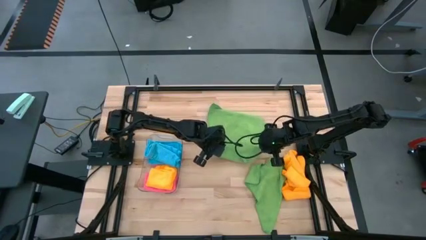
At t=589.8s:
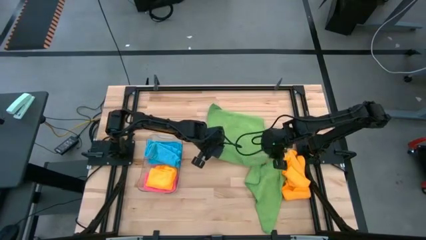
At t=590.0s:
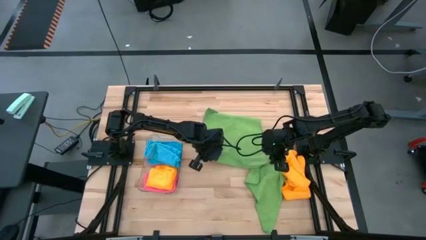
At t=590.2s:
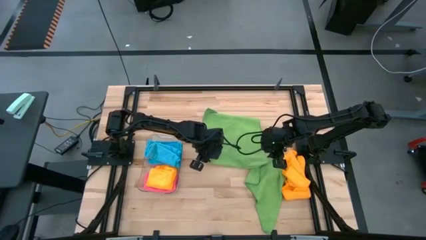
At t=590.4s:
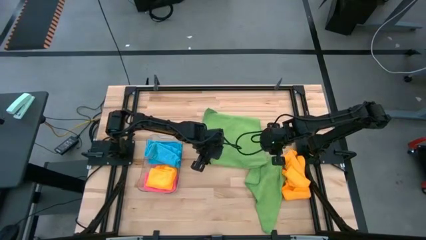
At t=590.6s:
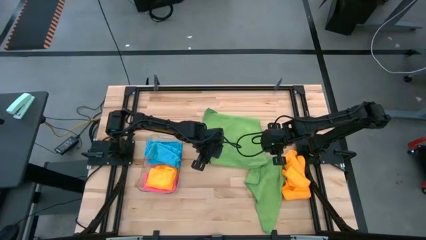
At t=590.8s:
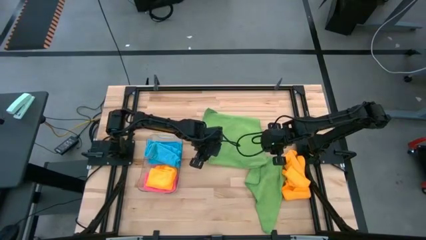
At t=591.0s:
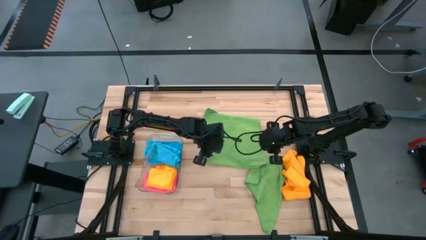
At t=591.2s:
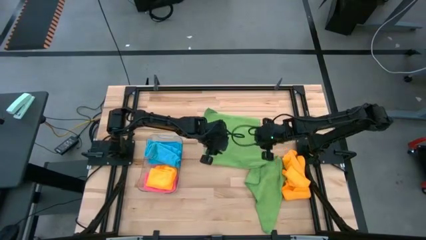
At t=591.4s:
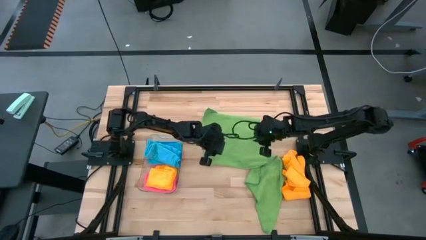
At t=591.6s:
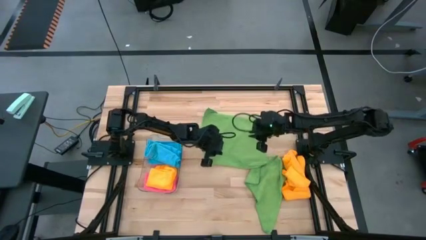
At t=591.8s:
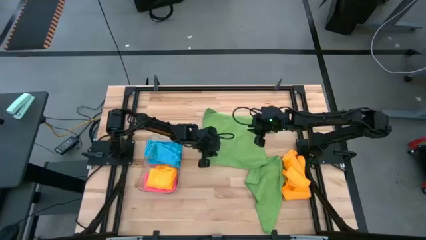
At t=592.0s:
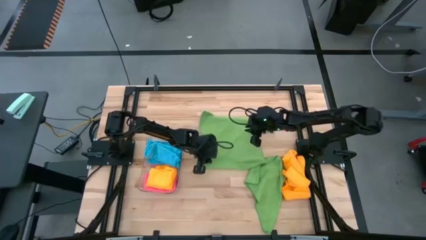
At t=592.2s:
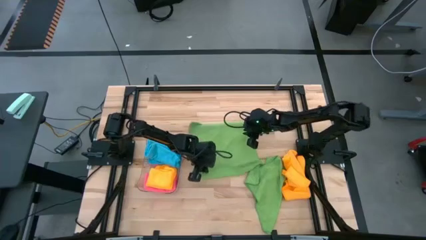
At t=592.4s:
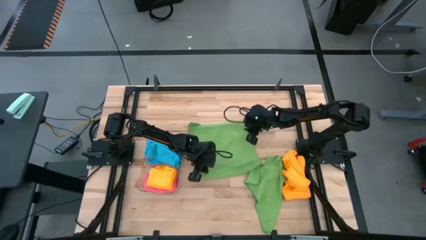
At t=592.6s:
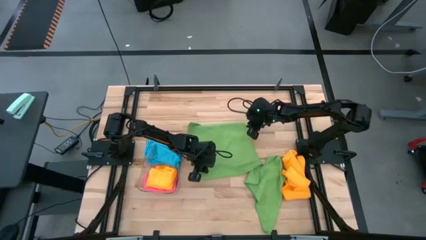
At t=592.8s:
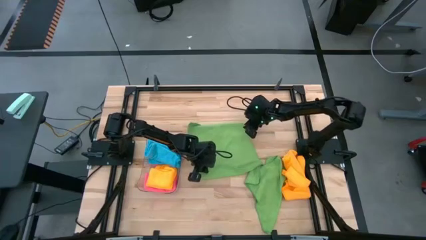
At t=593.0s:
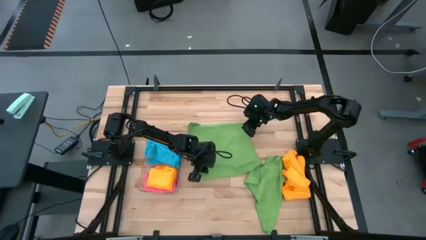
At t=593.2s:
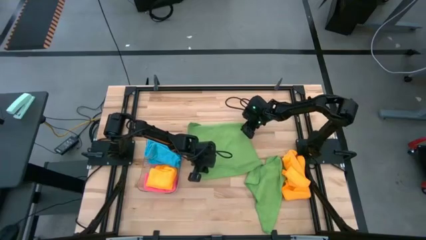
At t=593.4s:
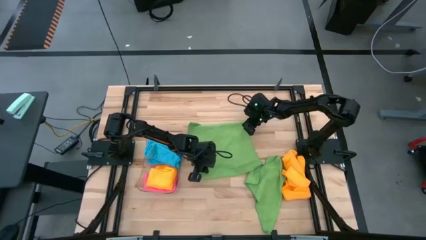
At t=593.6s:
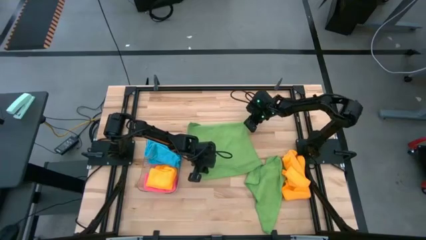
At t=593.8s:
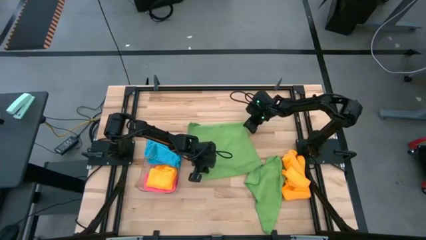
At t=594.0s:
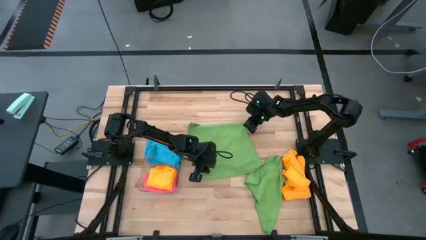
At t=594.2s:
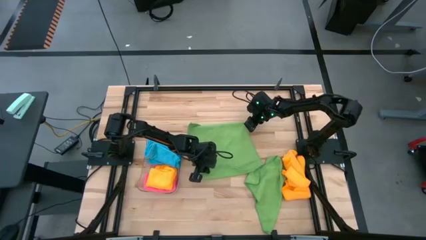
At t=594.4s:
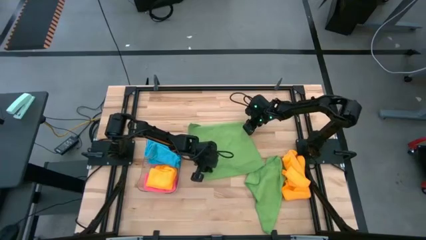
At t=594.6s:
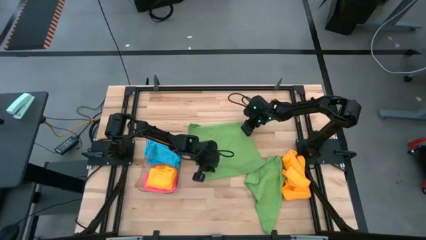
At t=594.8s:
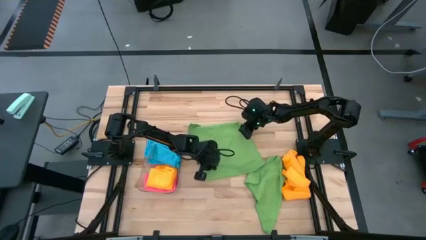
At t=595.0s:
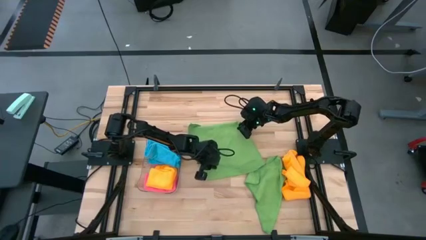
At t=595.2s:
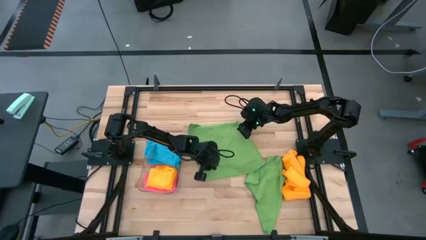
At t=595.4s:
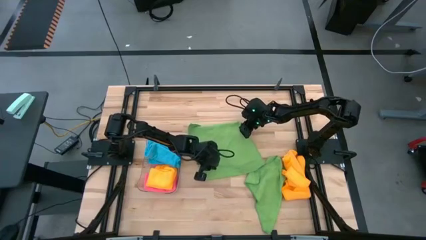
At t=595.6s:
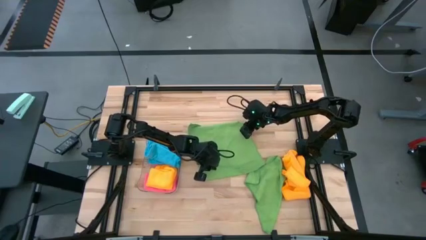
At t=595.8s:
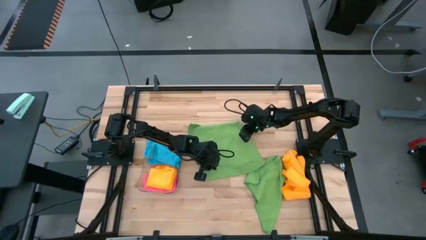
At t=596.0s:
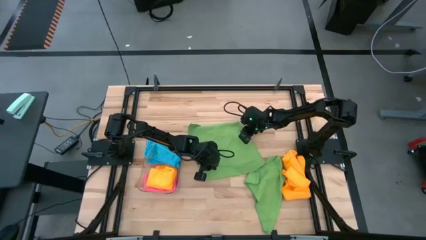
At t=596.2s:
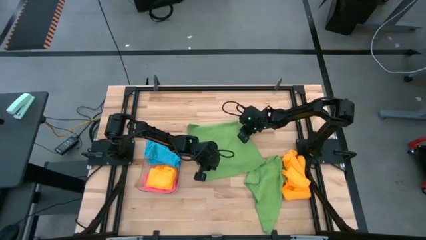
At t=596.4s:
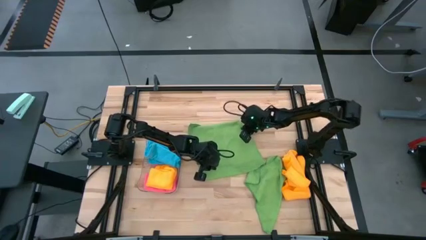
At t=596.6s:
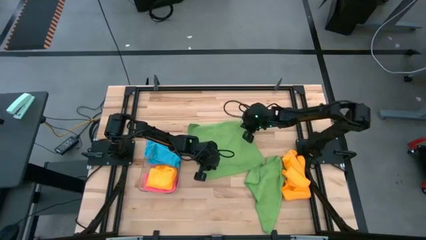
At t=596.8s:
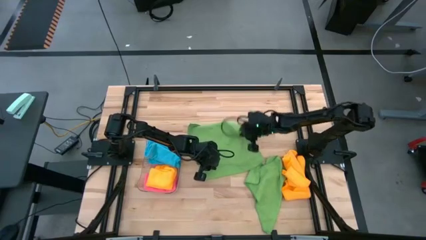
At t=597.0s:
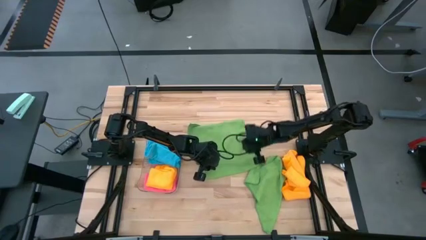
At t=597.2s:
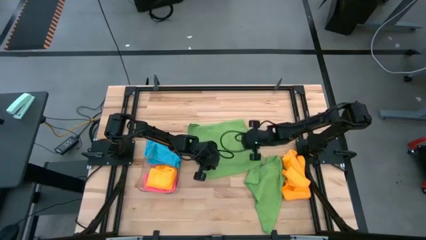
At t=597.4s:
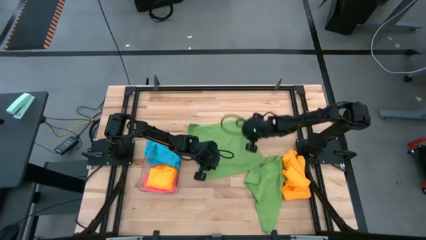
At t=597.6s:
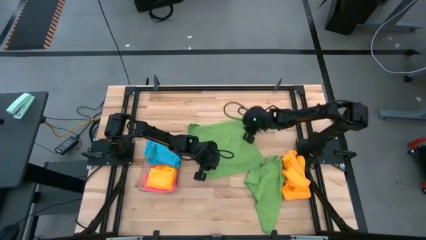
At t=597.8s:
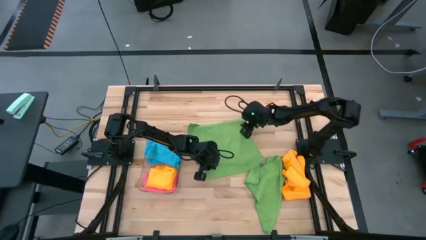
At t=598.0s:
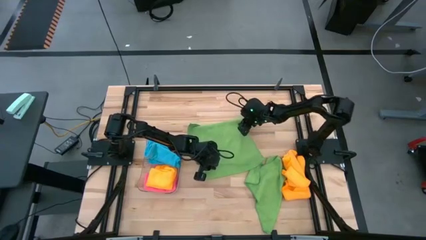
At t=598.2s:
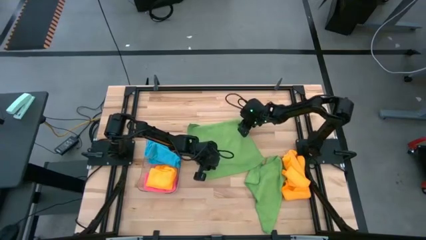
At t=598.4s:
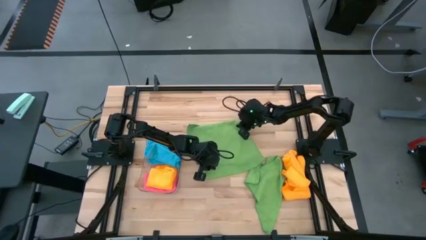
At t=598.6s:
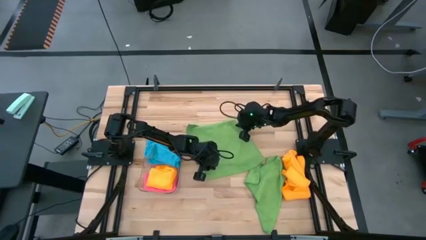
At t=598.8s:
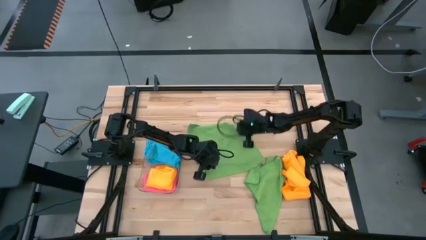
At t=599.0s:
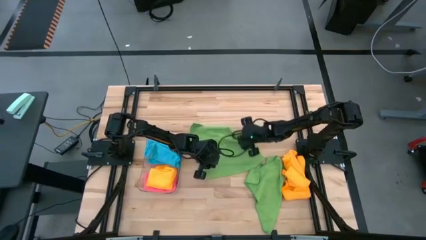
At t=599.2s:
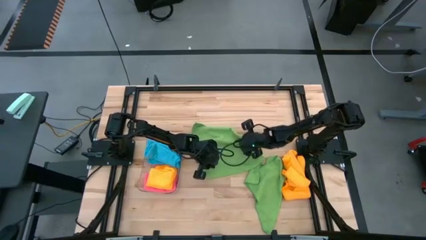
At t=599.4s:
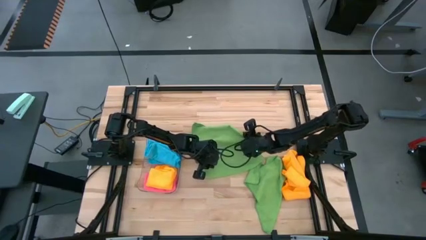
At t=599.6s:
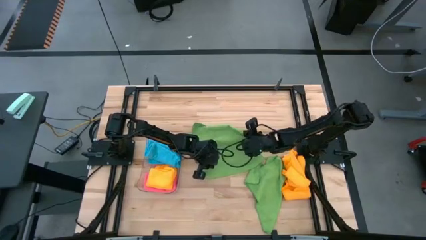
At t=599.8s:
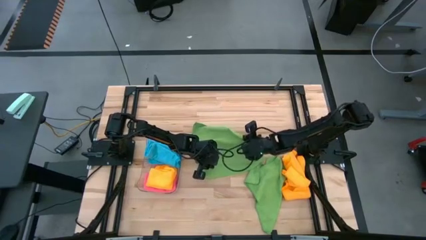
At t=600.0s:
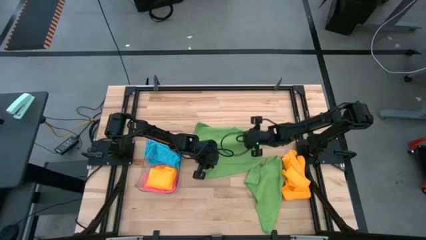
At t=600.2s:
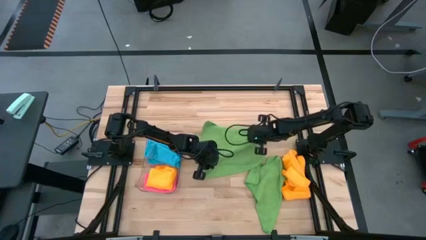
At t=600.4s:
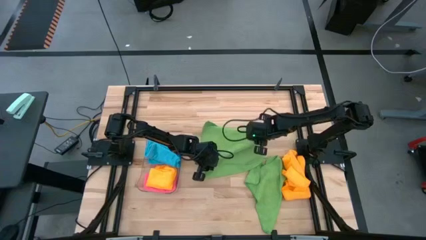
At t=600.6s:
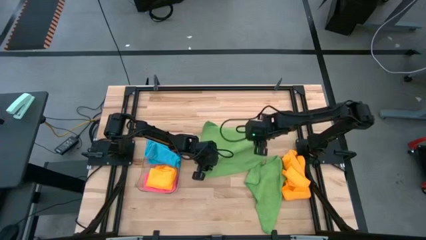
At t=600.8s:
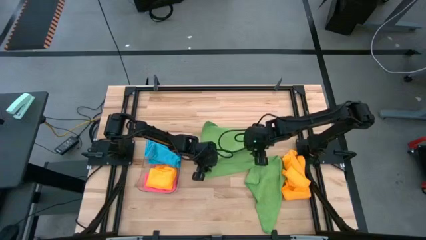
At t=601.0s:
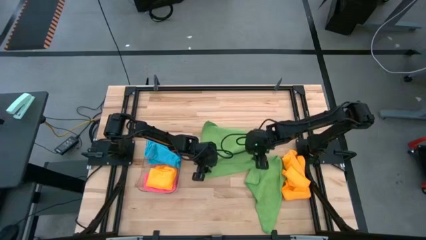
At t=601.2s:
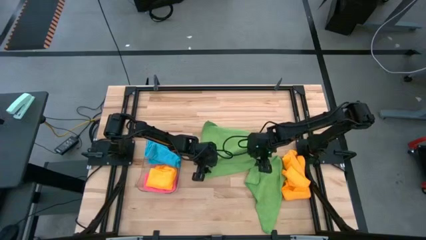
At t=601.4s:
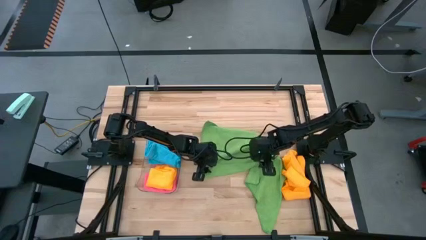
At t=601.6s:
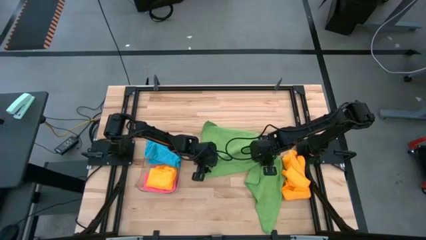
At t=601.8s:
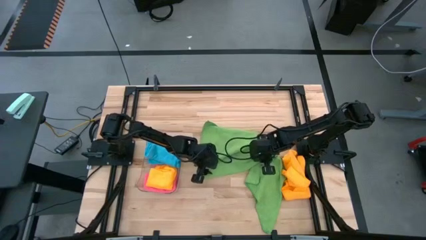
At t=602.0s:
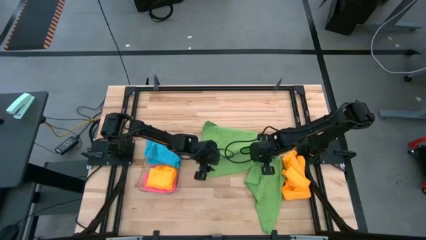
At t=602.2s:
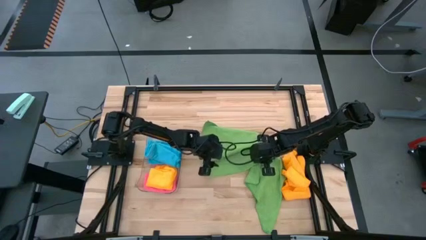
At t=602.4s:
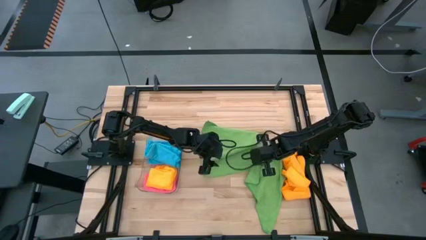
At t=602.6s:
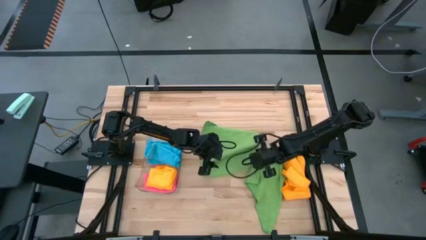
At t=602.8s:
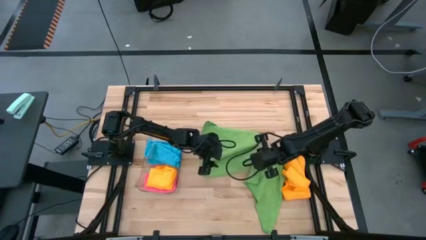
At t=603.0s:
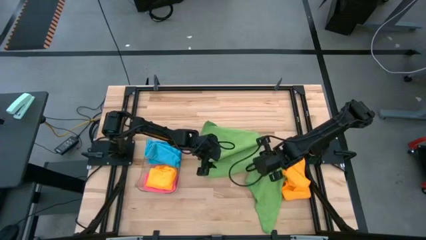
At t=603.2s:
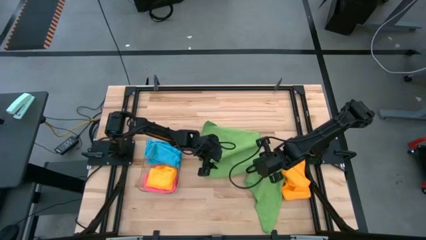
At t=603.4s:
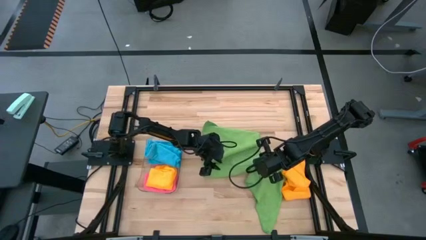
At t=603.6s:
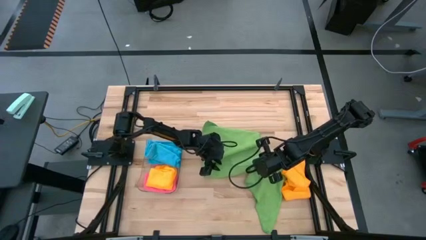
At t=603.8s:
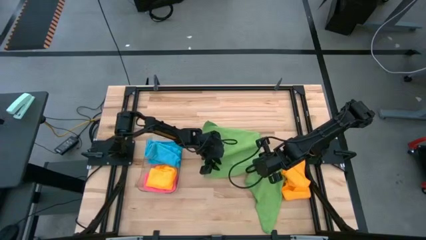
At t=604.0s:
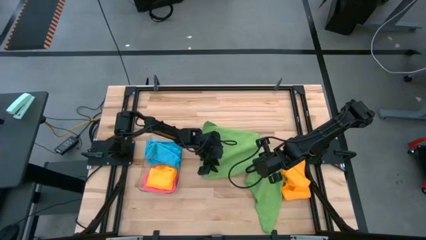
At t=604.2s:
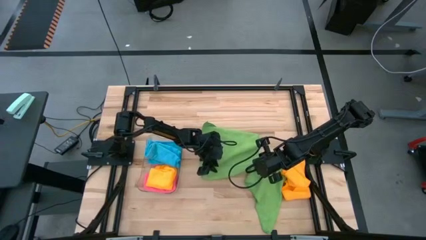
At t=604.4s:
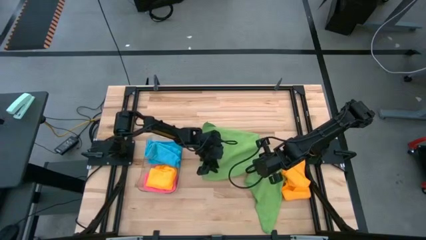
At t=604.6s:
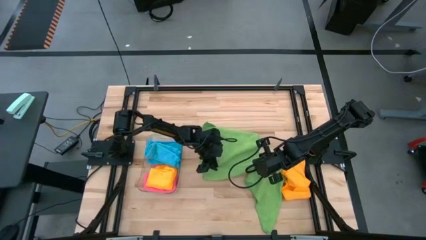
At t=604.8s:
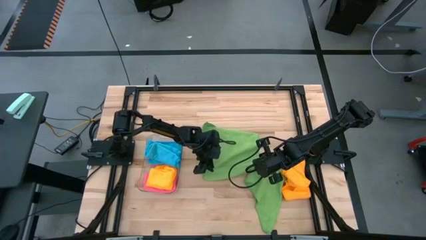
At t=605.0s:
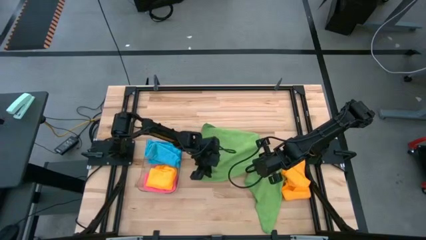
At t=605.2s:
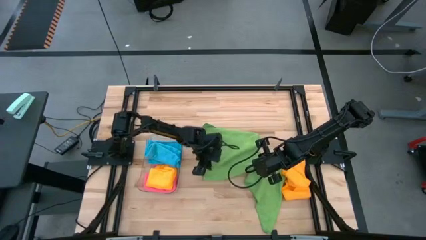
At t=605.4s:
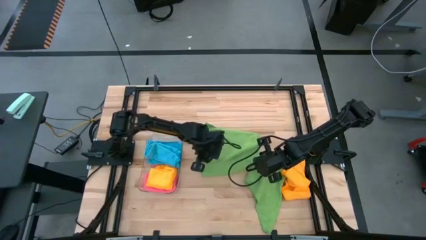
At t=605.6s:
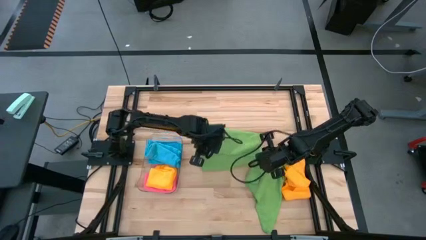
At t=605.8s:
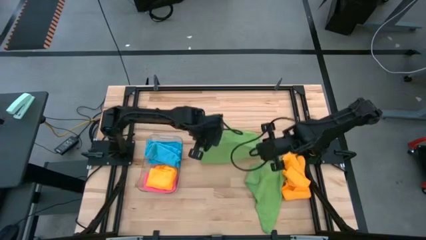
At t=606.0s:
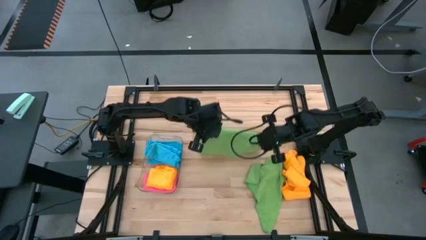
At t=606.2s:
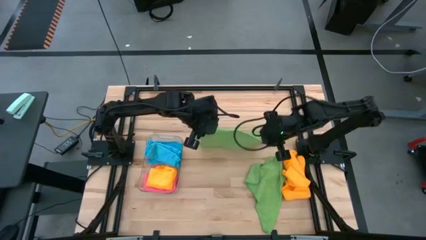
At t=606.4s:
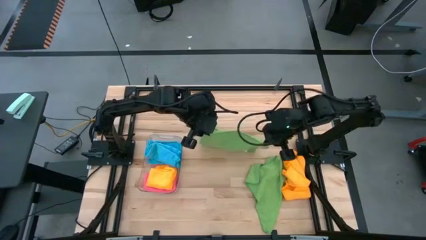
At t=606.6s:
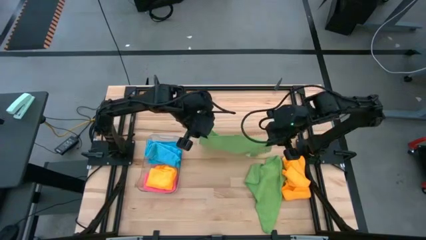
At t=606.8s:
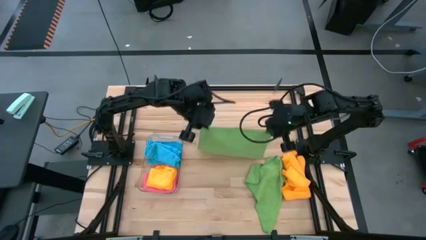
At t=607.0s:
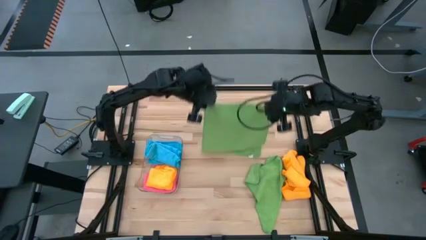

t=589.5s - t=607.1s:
Task: Fold microfiber towels
Fold the left green microfiber cloth
